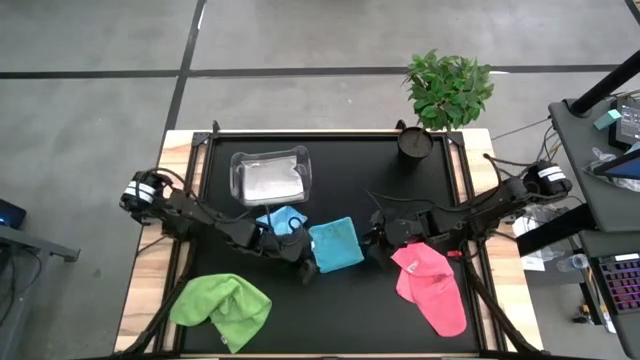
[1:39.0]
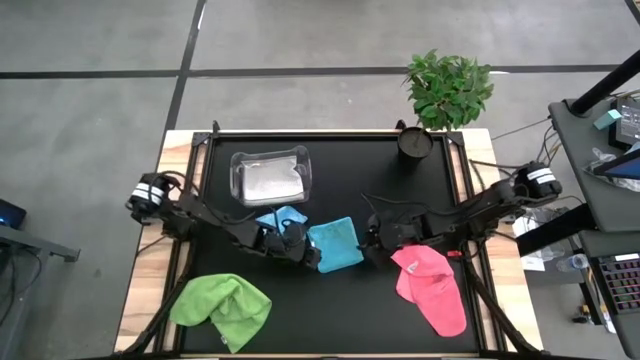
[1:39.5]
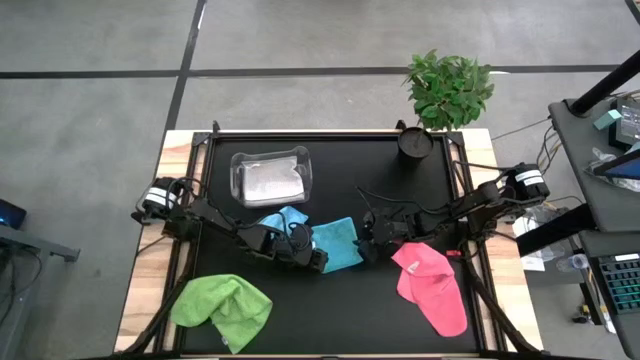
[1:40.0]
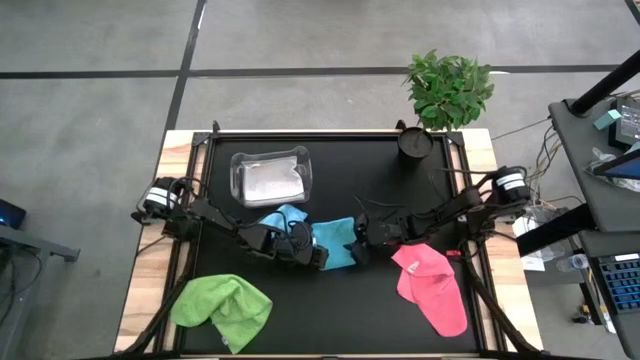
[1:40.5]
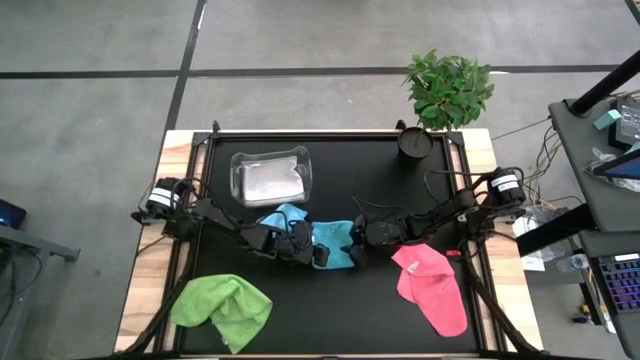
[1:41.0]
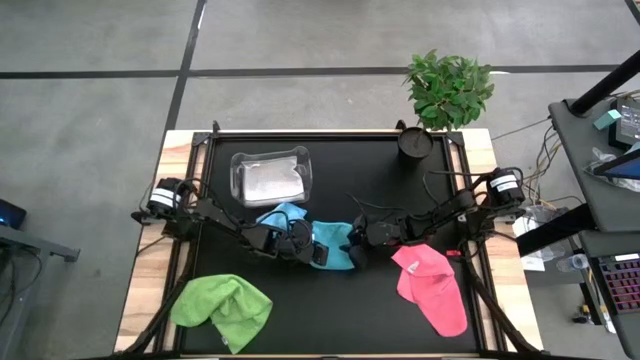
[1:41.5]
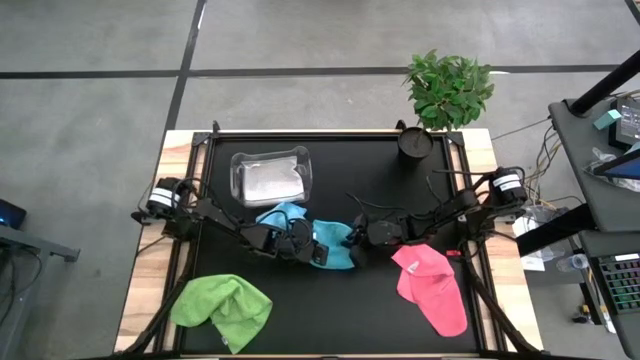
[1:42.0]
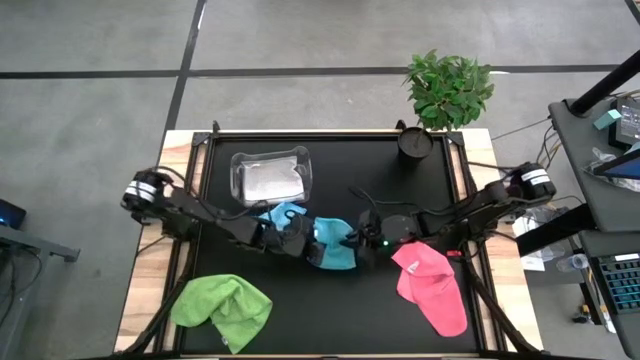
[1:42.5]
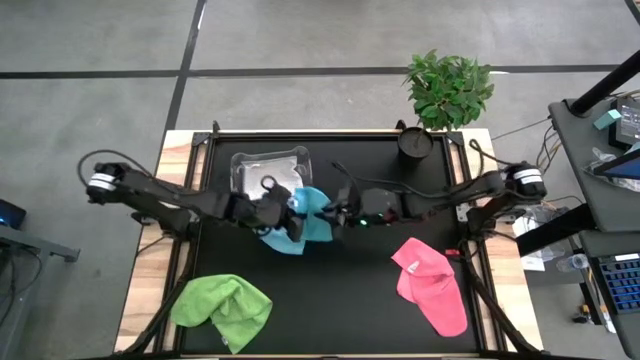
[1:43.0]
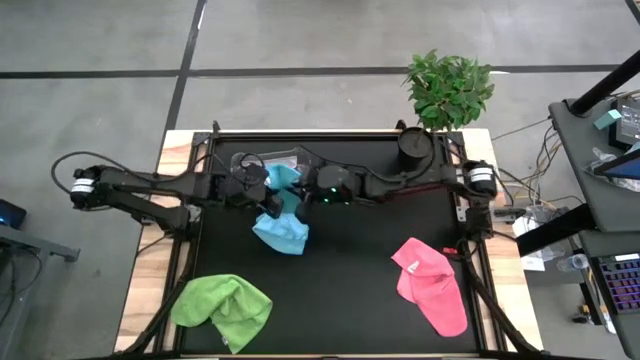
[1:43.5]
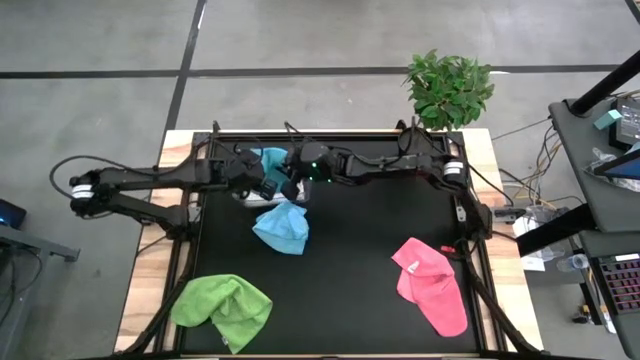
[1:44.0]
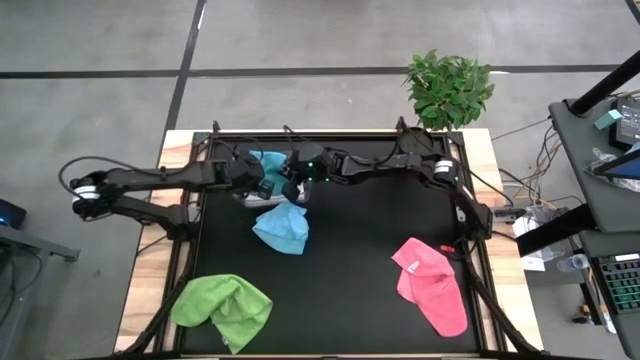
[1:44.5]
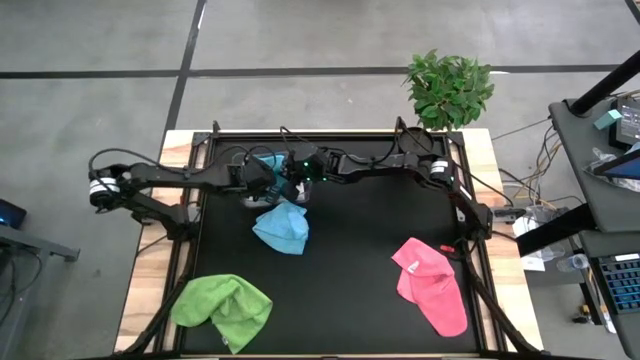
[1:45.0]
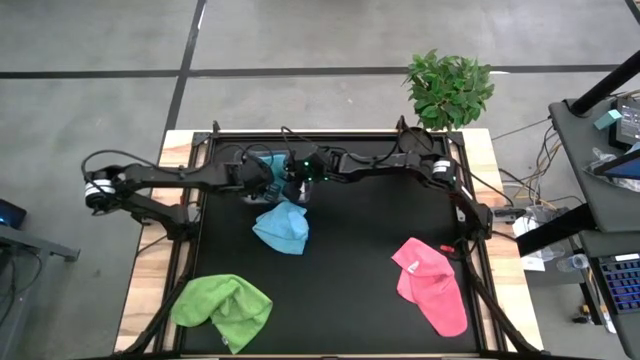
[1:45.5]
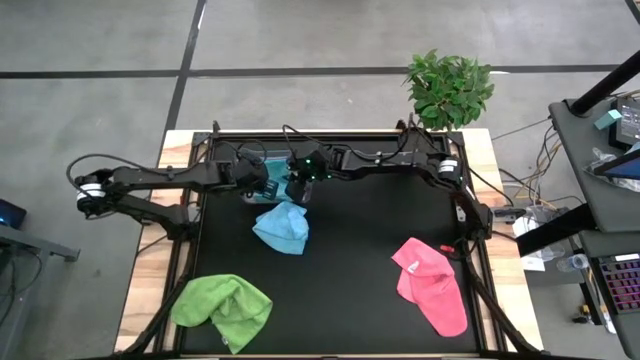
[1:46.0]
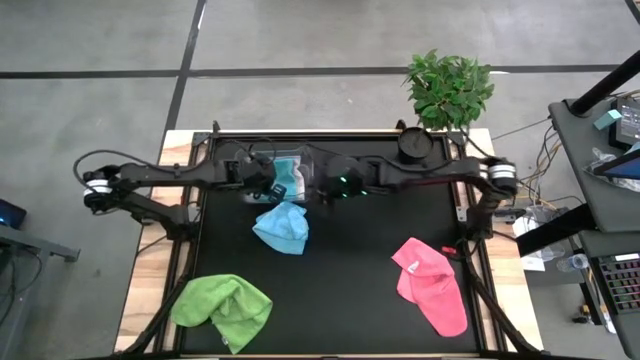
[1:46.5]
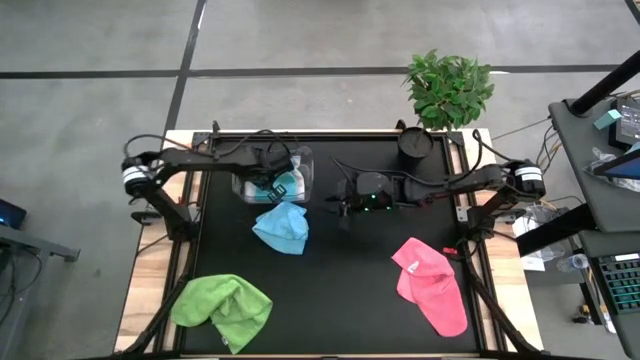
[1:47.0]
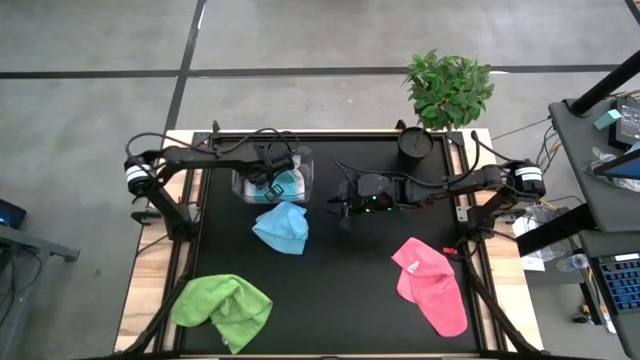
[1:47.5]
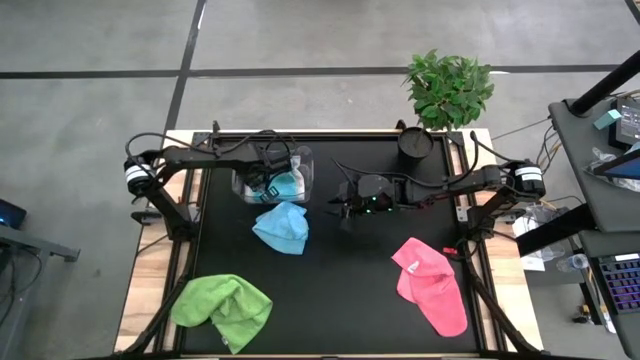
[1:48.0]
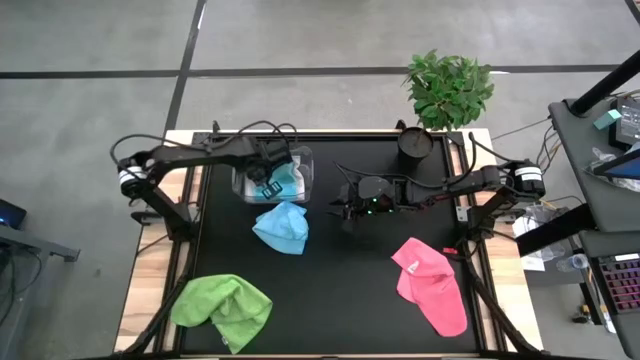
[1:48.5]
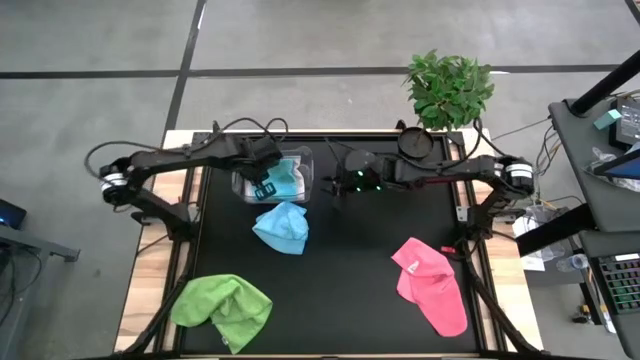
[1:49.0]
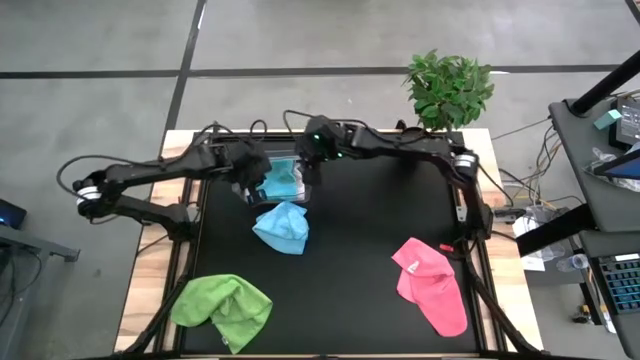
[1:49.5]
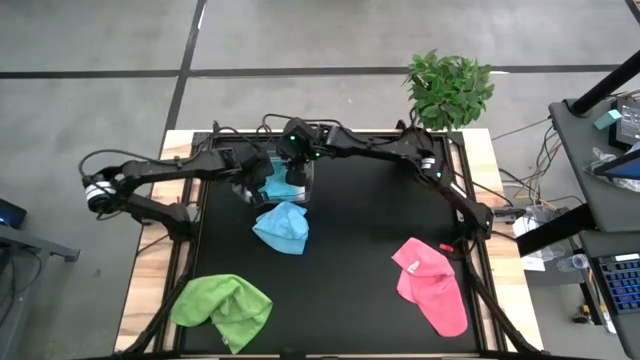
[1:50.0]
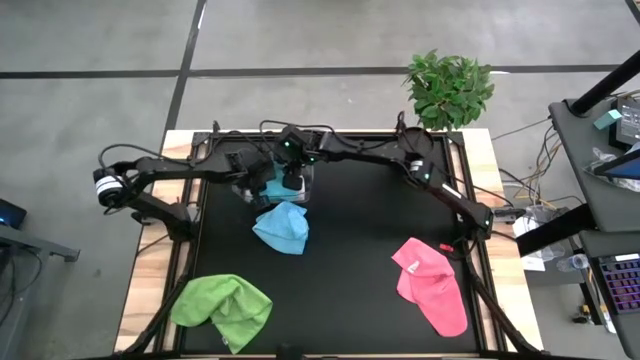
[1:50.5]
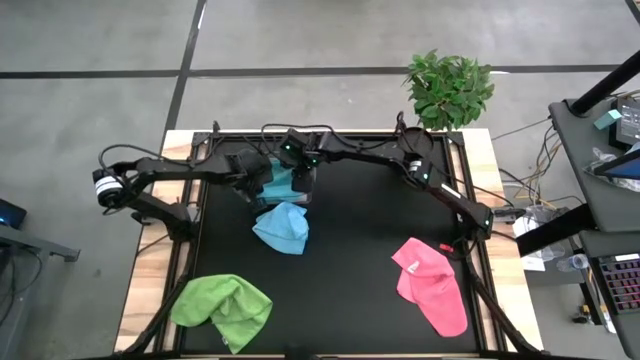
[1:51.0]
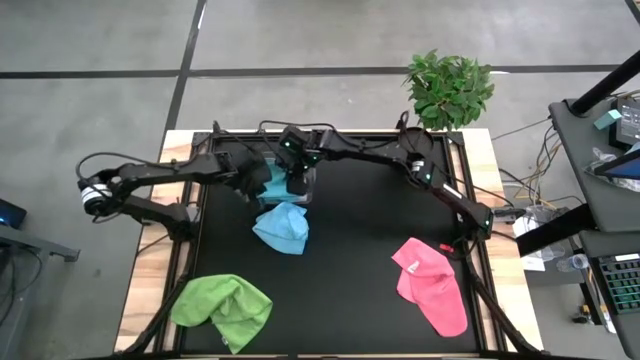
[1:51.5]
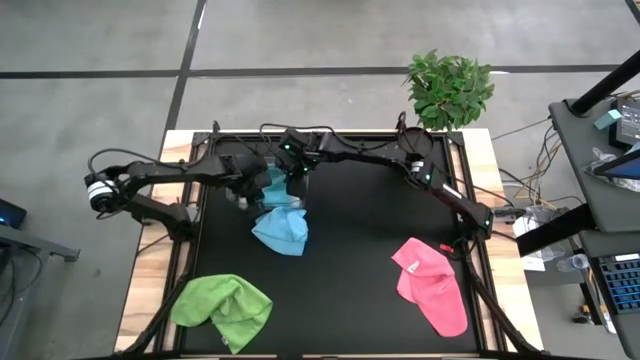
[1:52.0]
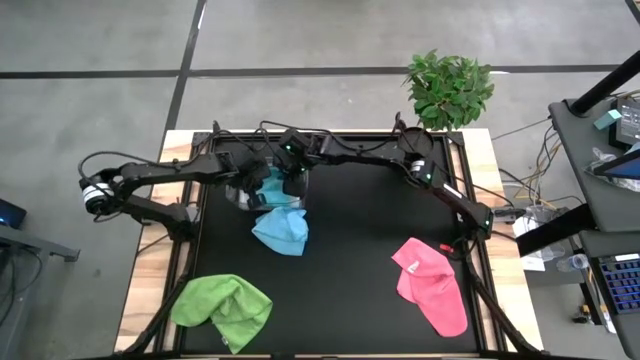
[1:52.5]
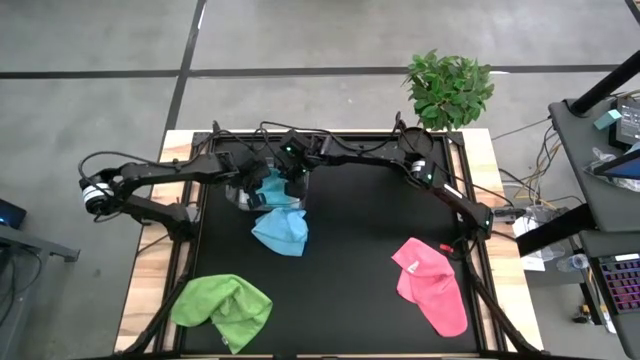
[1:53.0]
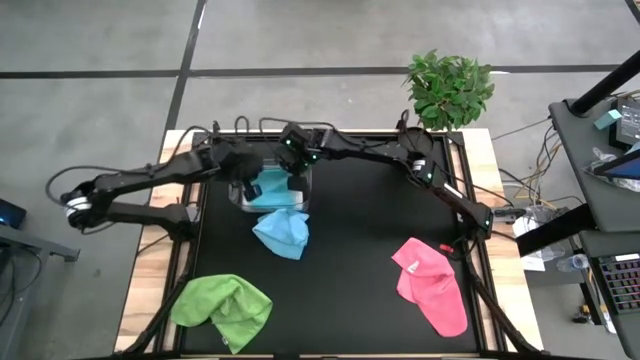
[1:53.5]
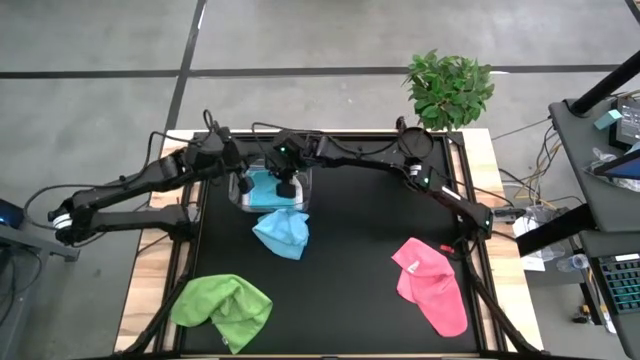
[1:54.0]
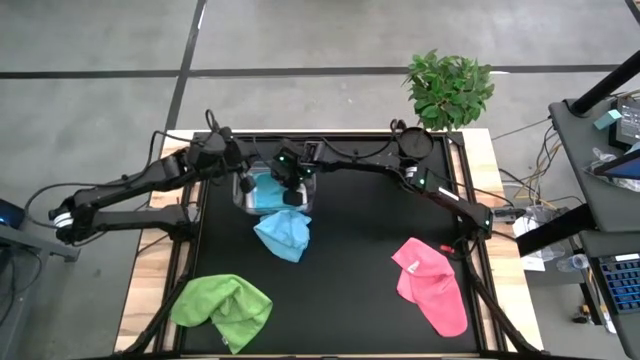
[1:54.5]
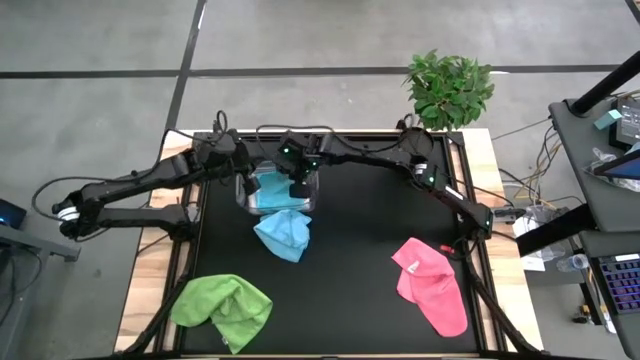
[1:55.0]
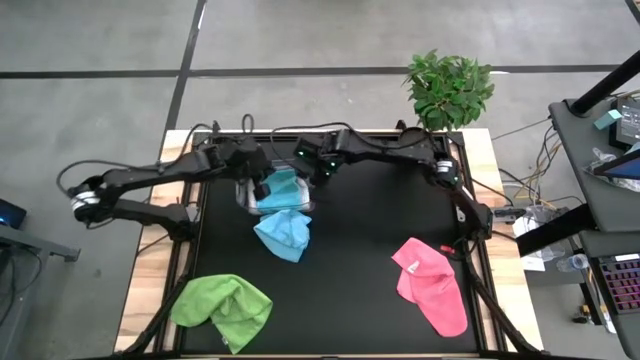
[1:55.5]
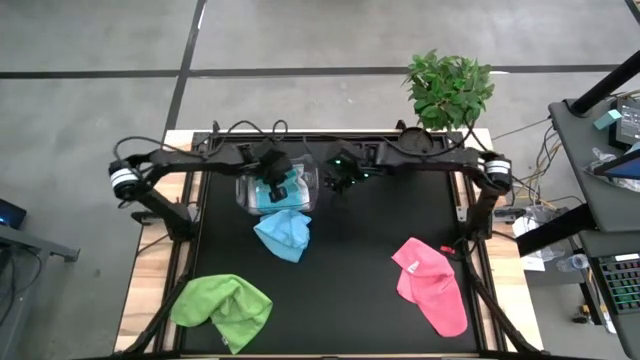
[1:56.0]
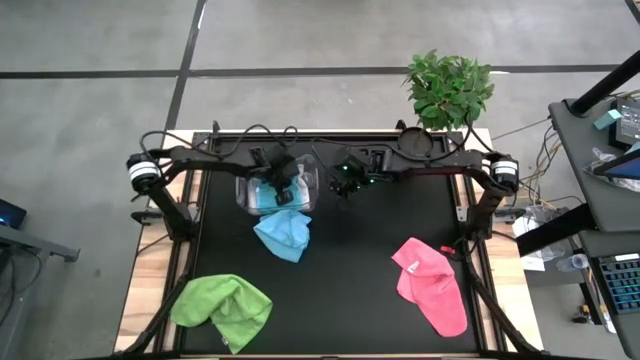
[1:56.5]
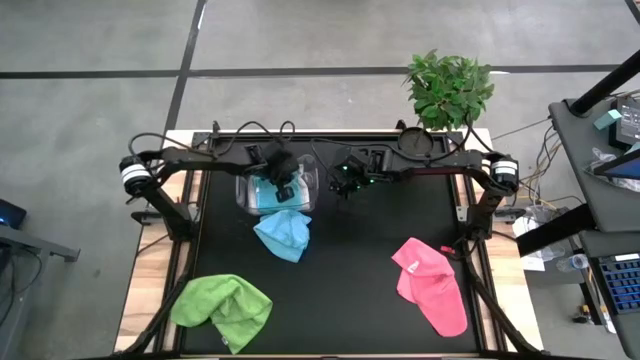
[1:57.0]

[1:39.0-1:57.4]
Task: Fold microfiber towels
Put the blue microfiber cloth into the transparent bin

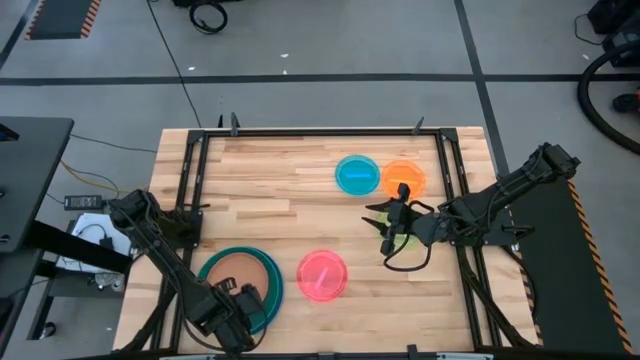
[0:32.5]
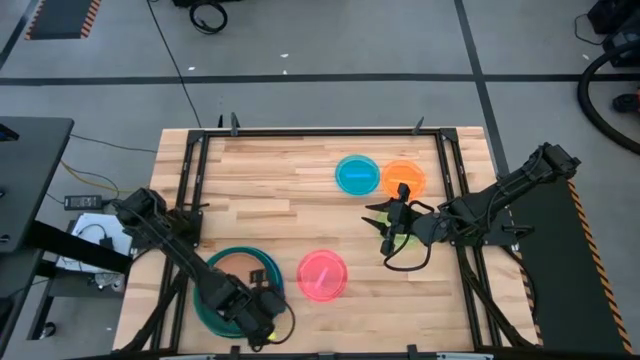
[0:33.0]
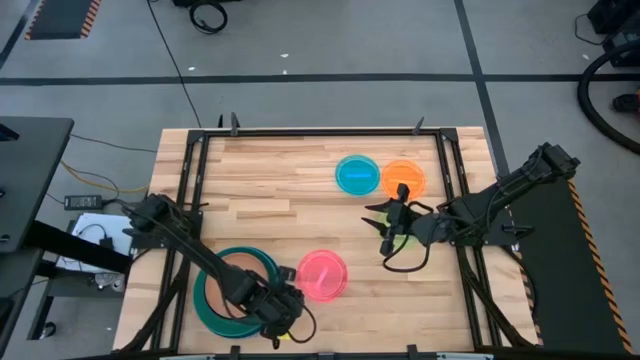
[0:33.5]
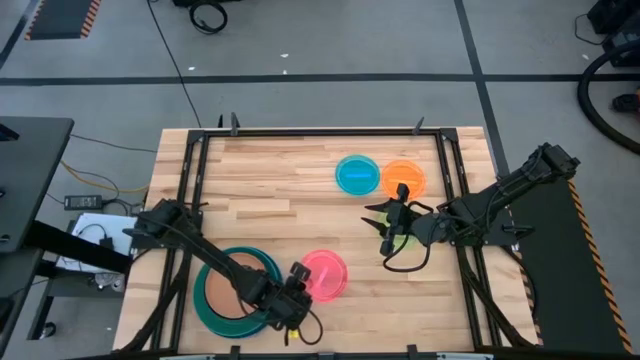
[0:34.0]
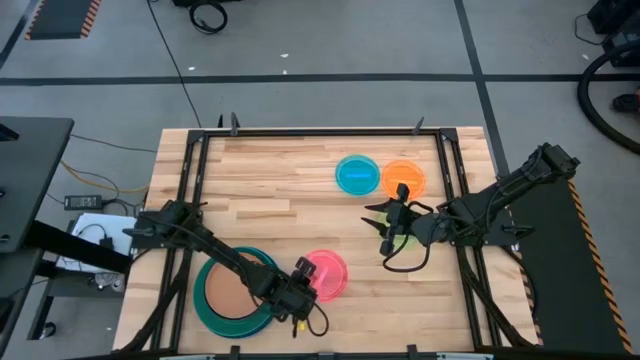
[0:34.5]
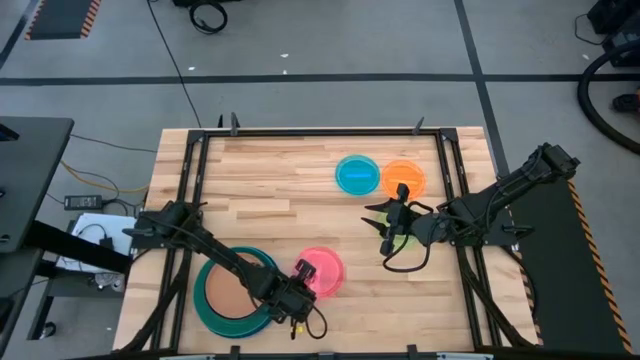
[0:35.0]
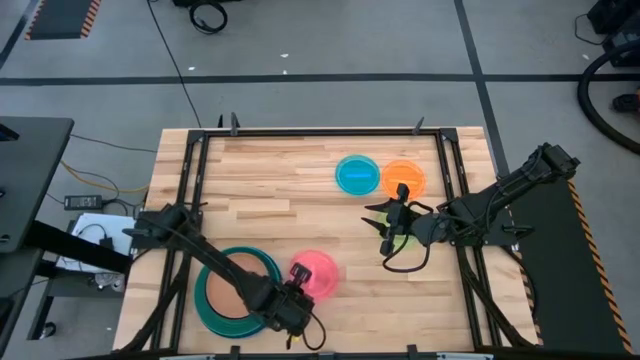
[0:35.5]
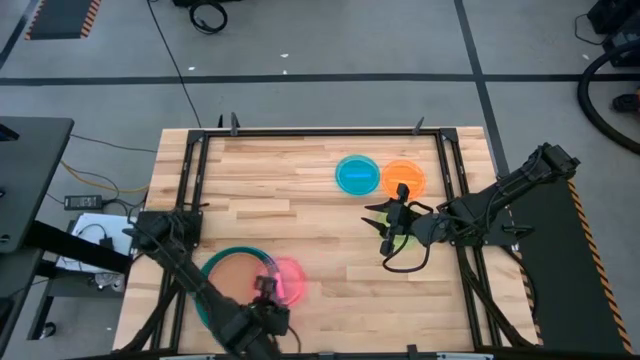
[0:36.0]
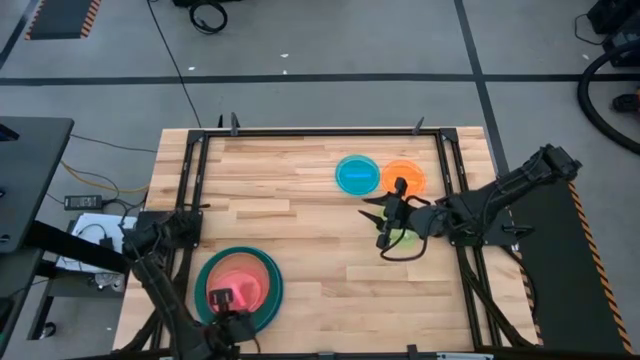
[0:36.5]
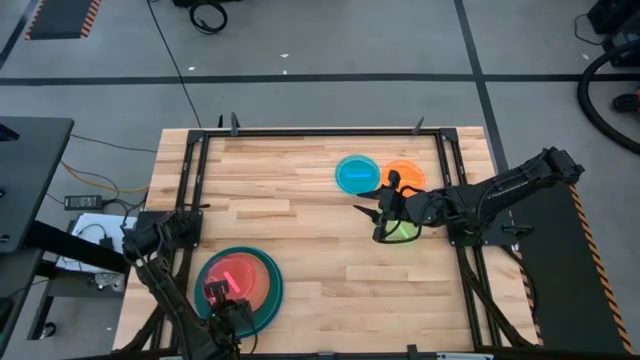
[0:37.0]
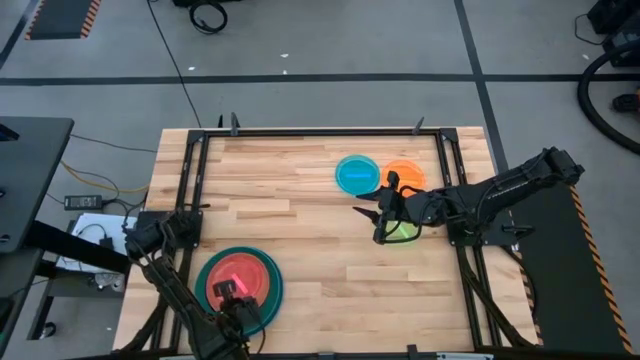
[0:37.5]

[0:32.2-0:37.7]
Task: Stack plastic plates
Stack the pink plate on top of the brown plate
